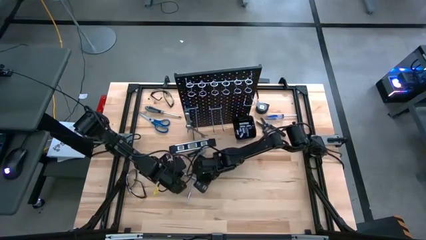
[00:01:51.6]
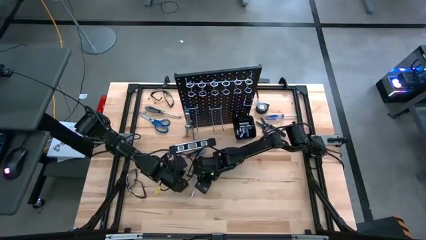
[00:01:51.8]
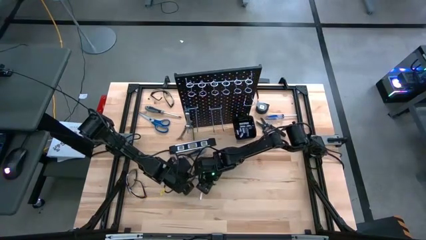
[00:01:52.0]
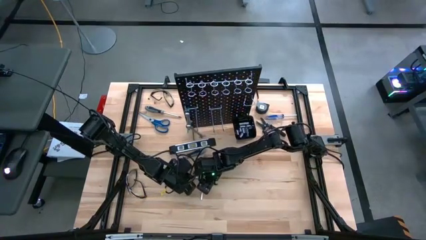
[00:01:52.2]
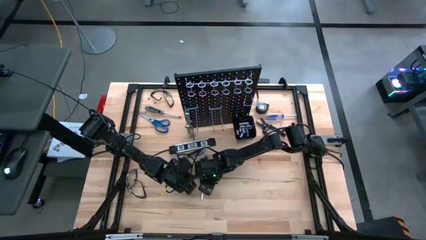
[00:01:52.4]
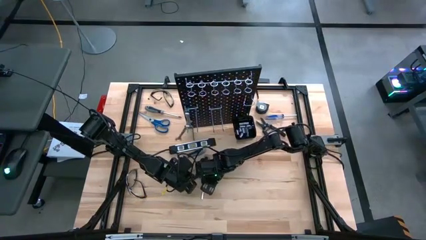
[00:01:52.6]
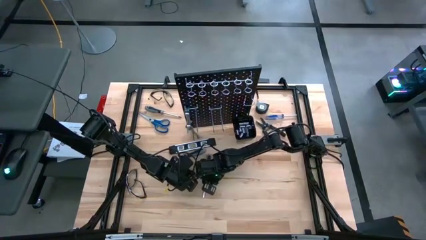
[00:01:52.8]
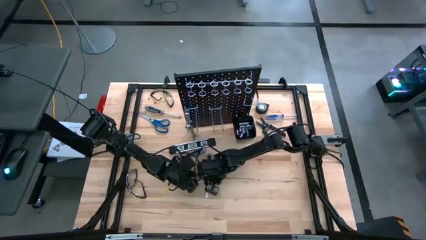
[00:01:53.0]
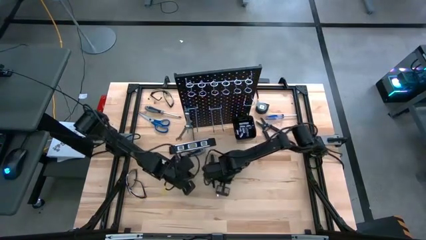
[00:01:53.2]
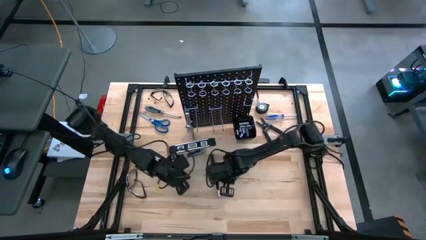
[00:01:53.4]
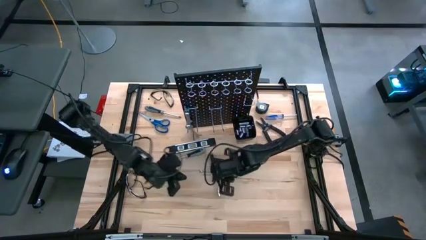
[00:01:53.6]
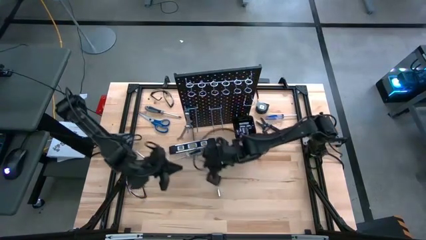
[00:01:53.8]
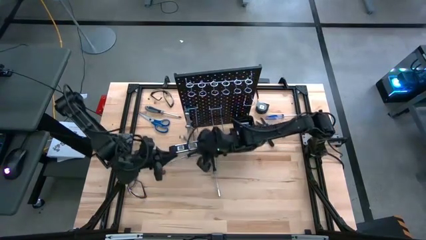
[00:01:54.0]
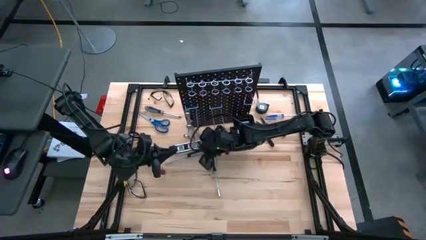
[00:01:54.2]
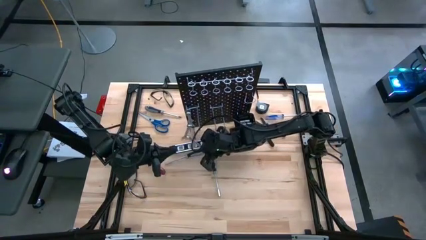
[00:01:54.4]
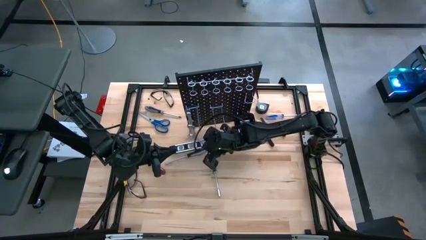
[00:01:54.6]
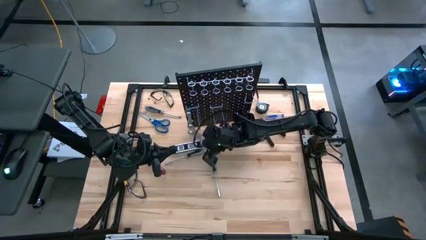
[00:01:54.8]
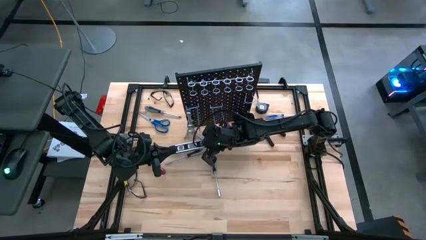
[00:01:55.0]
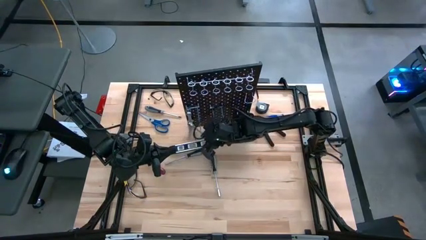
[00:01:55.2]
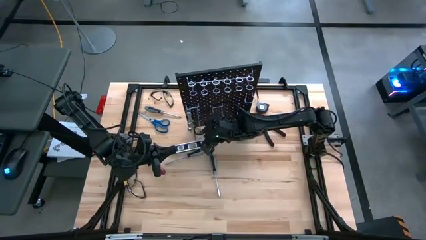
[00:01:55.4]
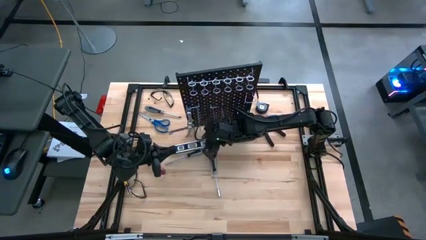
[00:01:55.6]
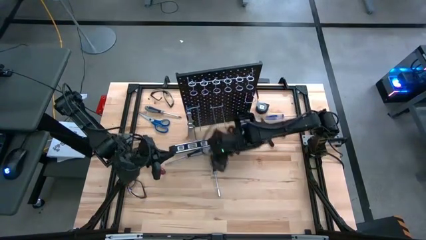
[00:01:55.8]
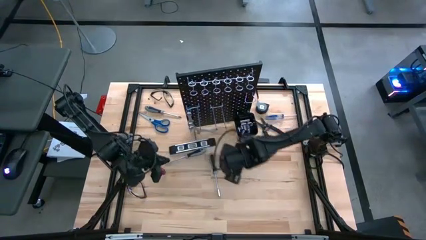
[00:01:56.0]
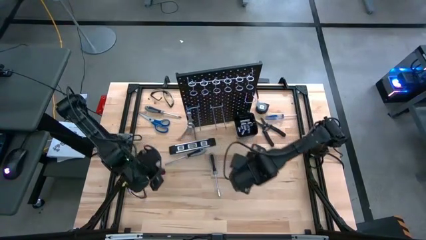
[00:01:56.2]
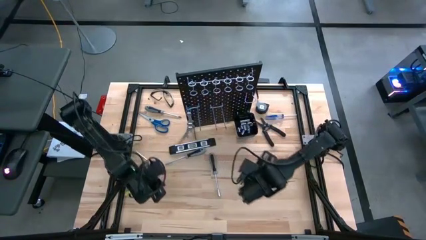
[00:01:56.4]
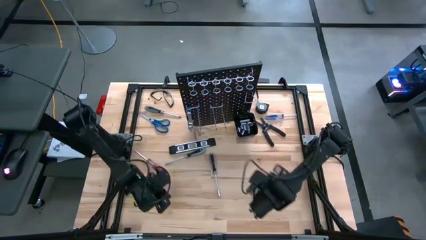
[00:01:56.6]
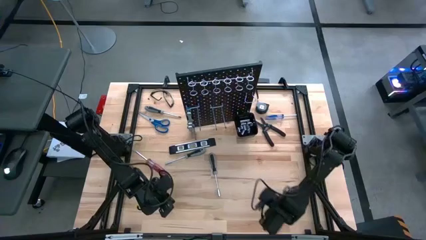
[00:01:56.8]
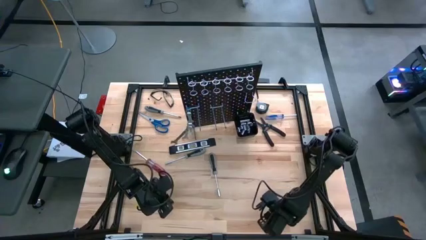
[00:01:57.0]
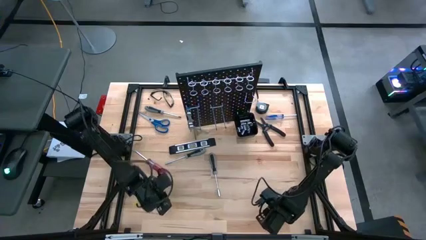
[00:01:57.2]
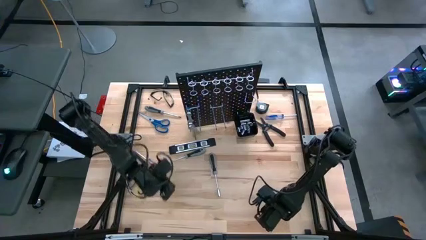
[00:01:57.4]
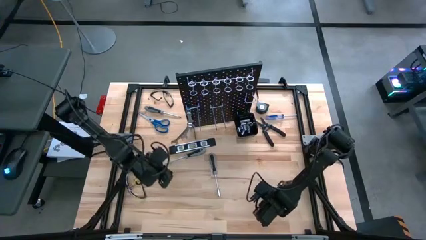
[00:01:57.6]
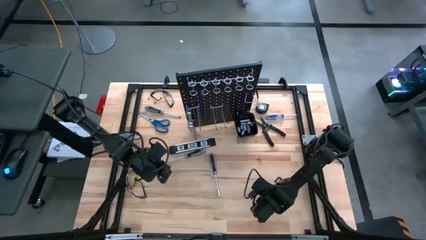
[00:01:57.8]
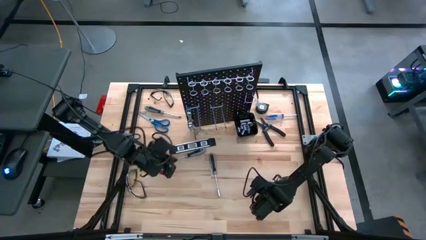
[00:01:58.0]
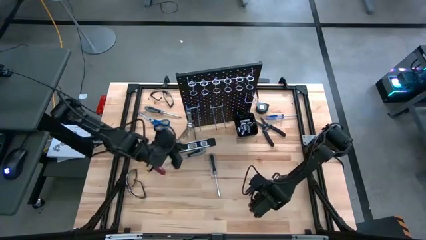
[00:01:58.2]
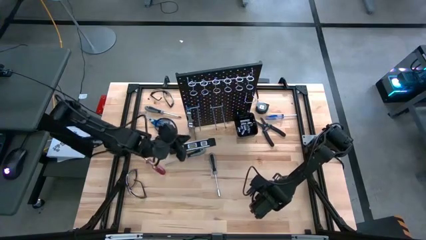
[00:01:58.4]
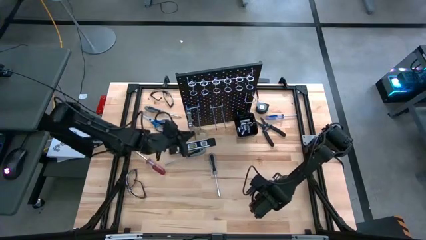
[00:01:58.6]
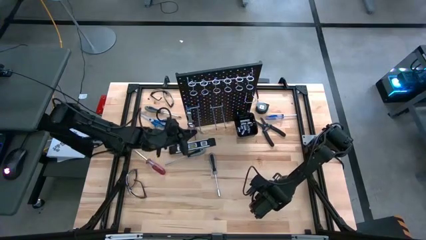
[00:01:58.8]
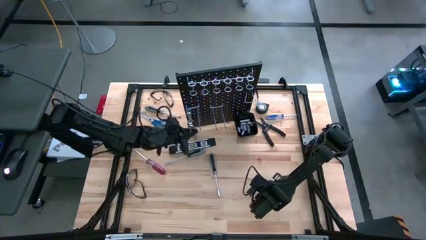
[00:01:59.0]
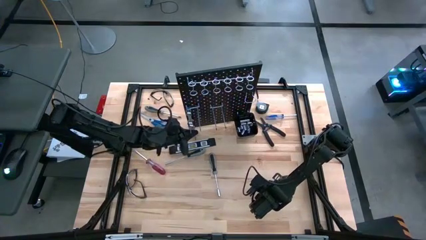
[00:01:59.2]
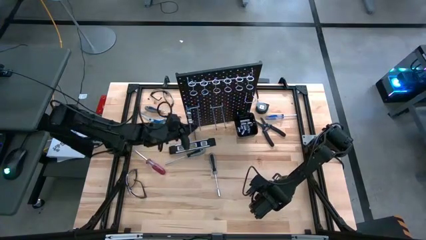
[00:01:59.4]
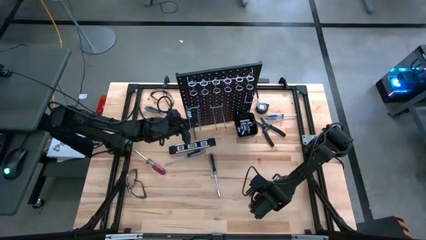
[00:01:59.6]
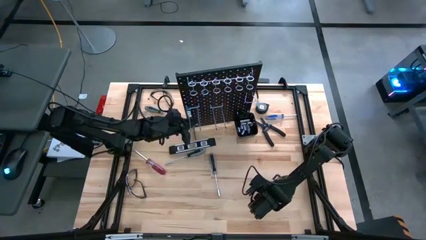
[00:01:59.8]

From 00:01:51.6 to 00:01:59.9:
Task: Hang tools onto peg board
Hang the silver wrench on the pegboard

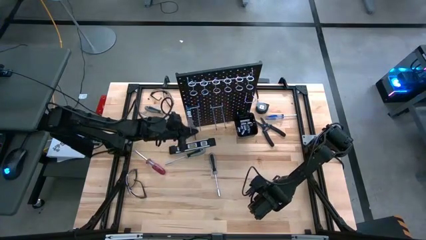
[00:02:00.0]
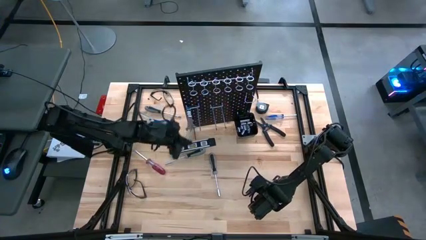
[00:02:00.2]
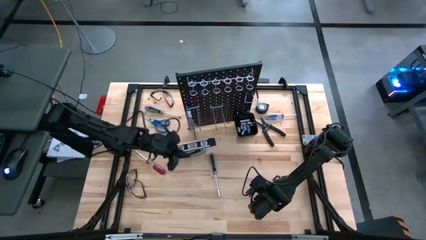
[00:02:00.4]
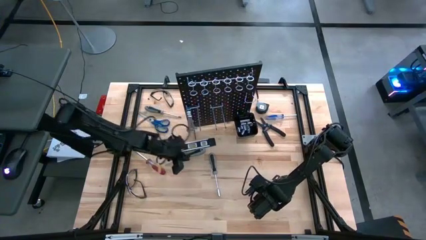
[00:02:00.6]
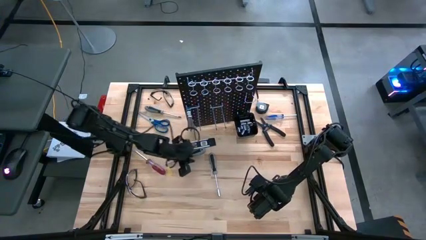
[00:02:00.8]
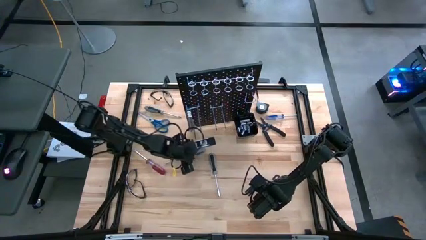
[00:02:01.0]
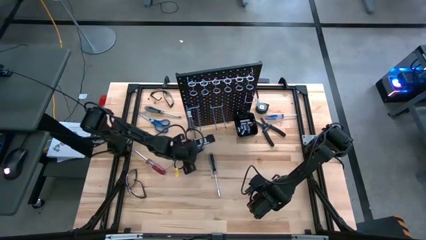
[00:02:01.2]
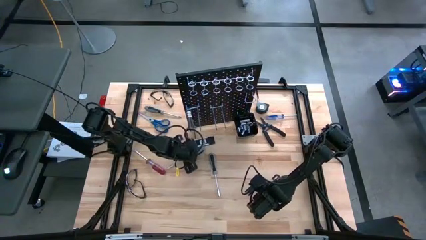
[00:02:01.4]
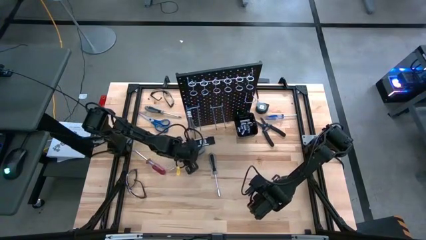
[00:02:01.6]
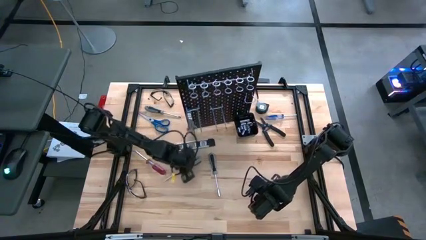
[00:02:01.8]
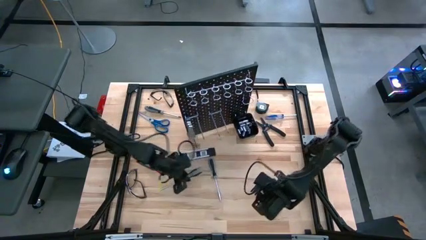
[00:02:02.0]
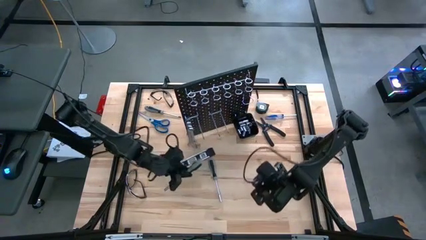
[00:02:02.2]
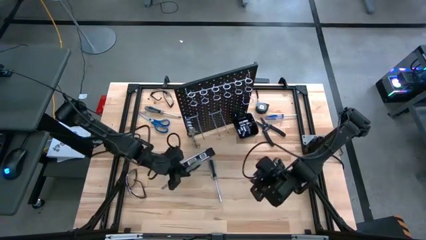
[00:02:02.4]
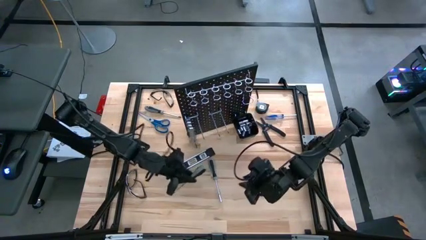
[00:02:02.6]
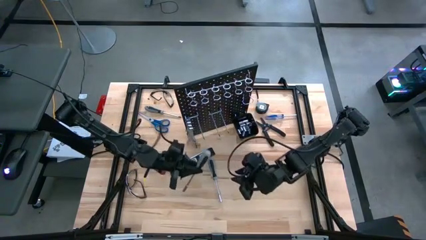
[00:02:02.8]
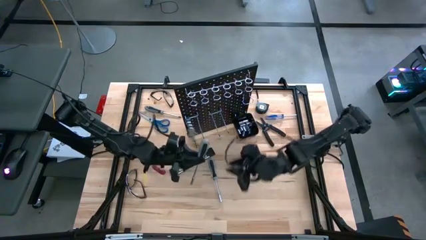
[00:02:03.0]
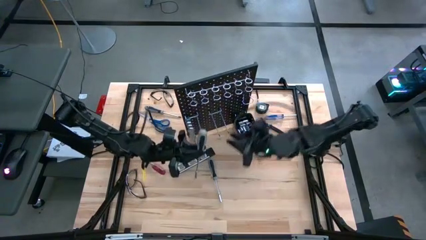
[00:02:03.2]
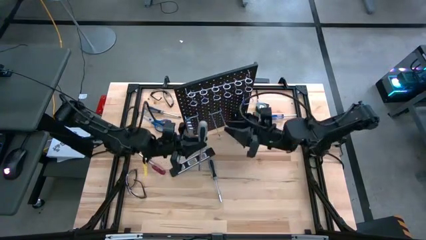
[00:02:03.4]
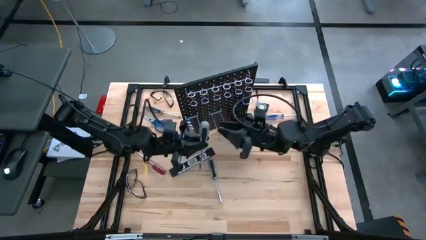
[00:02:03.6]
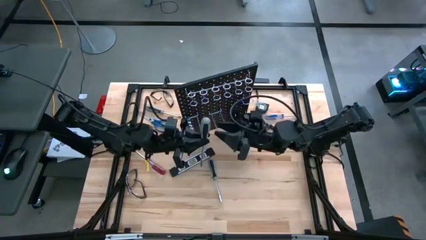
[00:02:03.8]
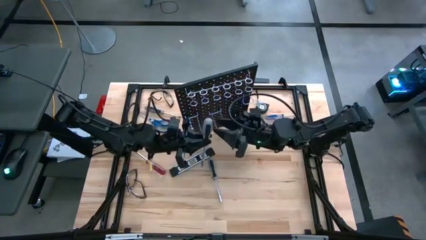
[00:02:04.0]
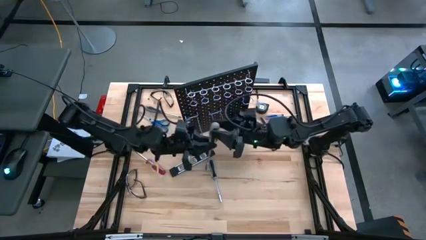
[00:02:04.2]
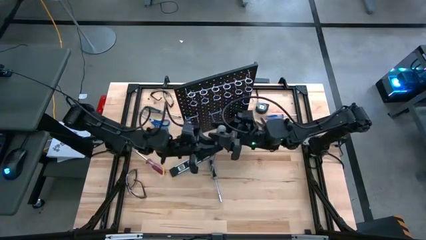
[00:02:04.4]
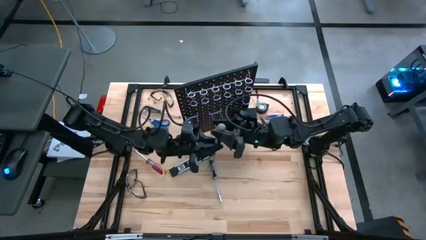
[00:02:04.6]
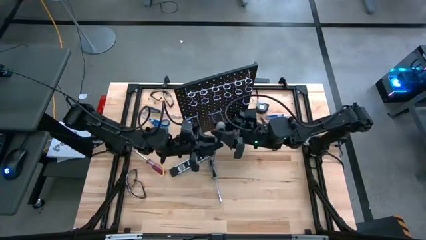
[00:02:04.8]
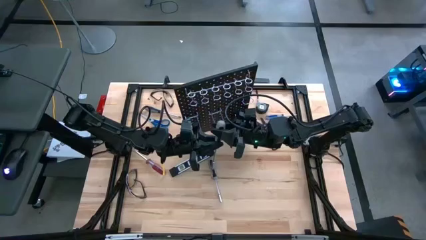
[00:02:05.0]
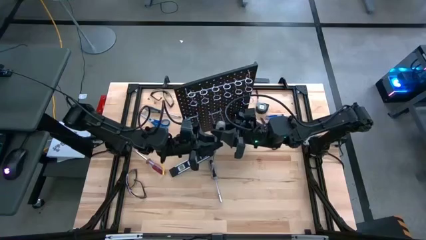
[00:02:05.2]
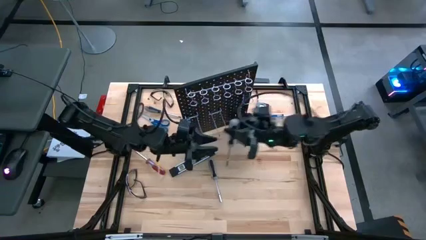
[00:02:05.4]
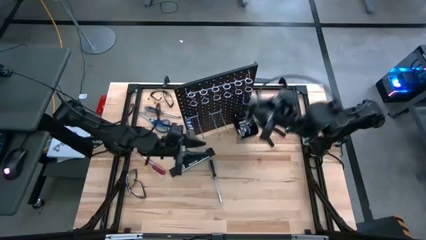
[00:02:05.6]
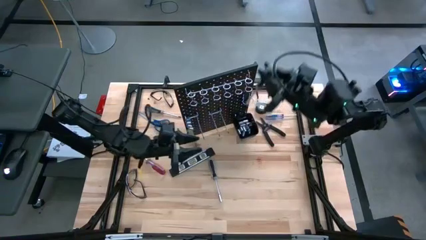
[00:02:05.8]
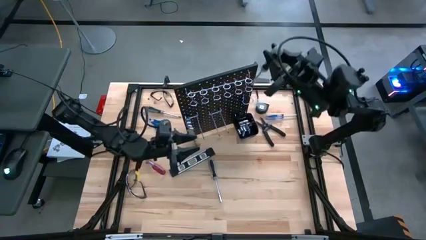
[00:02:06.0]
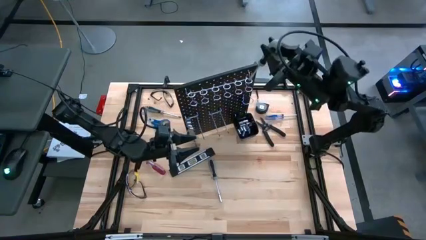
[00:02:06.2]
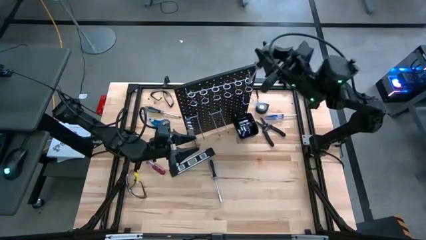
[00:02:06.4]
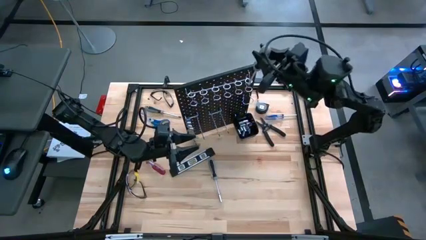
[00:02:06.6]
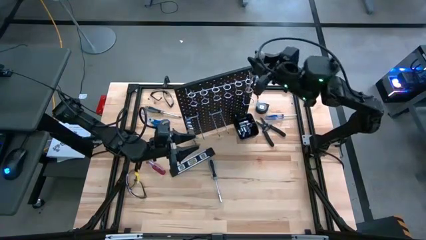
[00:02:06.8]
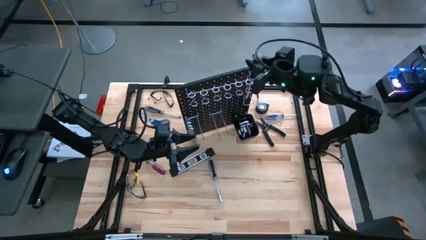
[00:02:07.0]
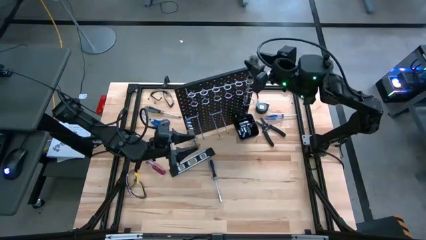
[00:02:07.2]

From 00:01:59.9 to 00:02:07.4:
Hang the gray screwdriver on the pegboard

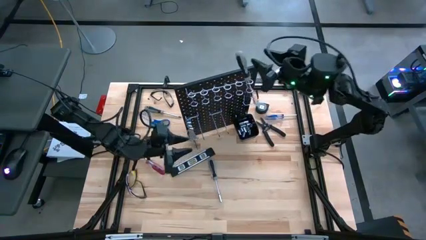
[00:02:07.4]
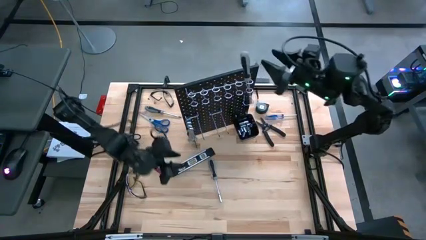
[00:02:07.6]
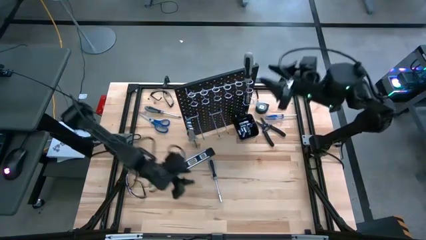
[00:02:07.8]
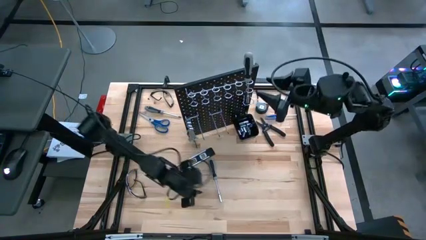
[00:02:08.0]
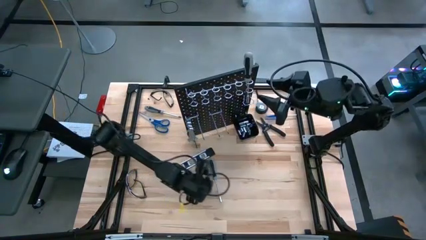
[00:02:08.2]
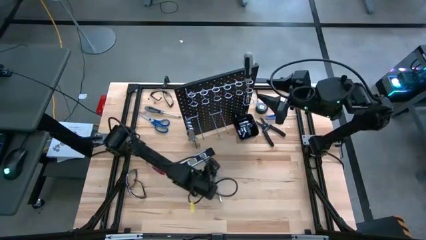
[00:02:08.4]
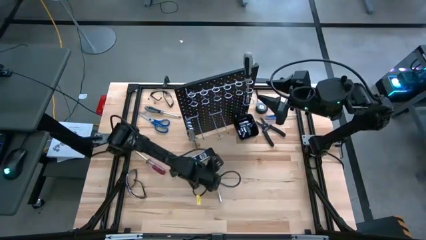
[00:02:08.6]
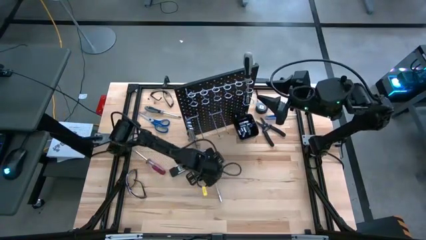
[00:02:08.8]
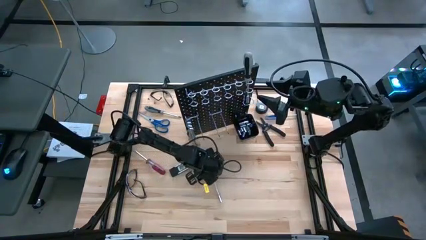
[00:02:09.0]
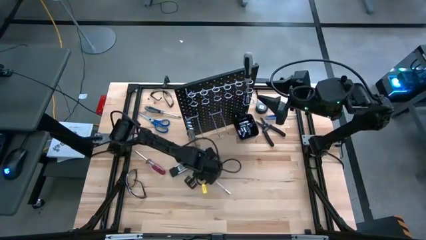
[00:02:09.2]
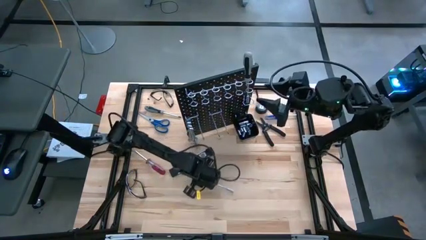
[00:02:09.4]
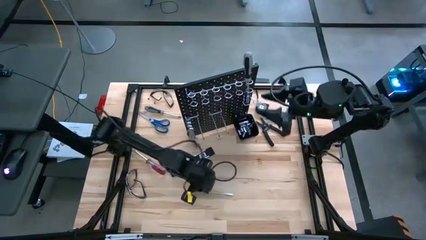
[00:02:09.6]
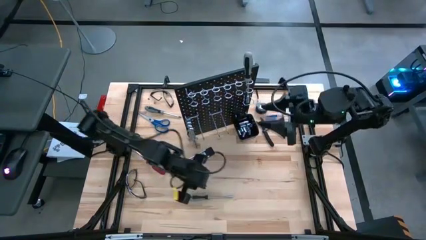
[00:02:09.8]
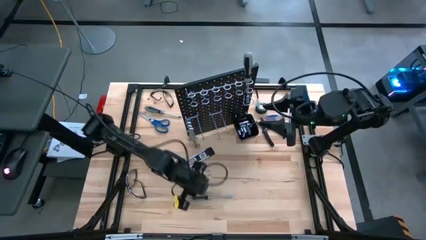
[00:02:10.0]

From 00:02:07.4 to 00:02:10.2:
Hang the gray screwdriver on the pegboard
